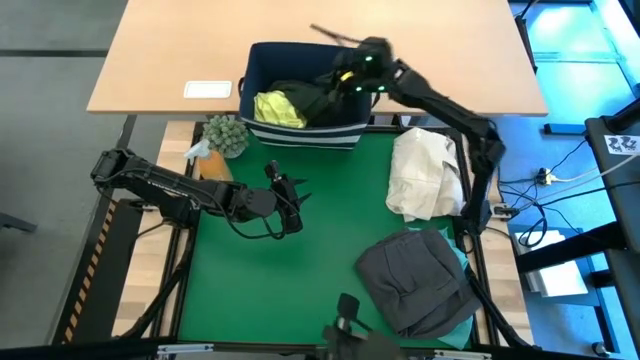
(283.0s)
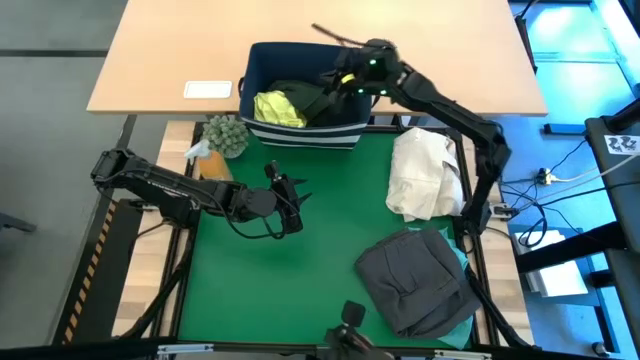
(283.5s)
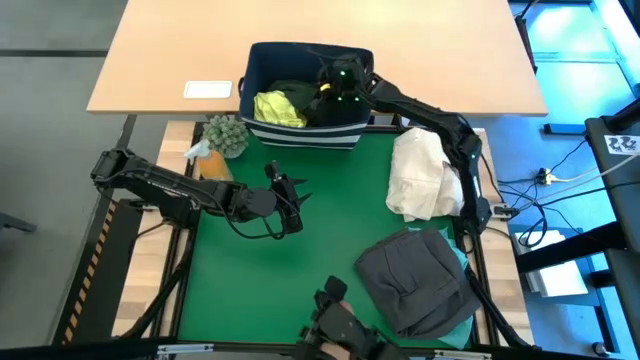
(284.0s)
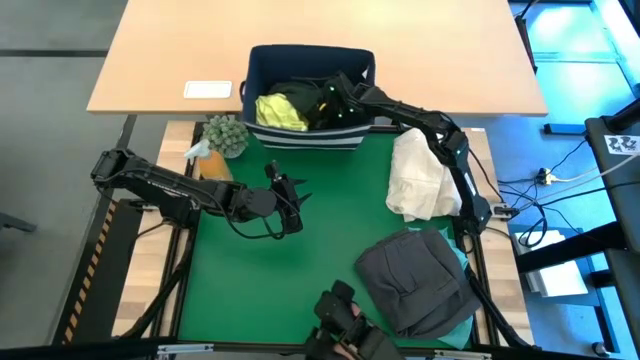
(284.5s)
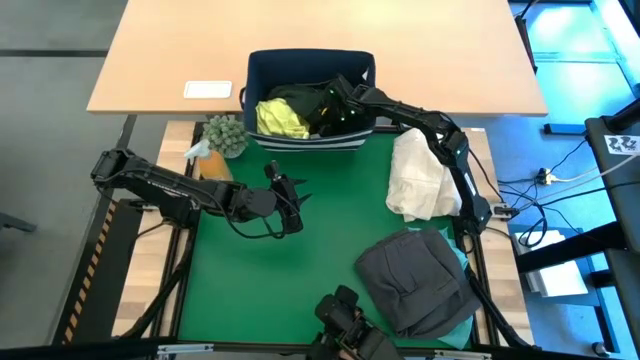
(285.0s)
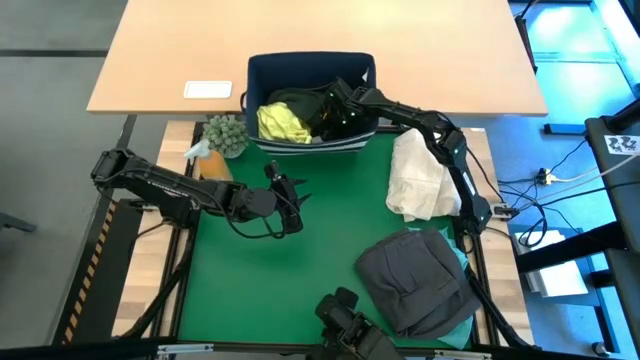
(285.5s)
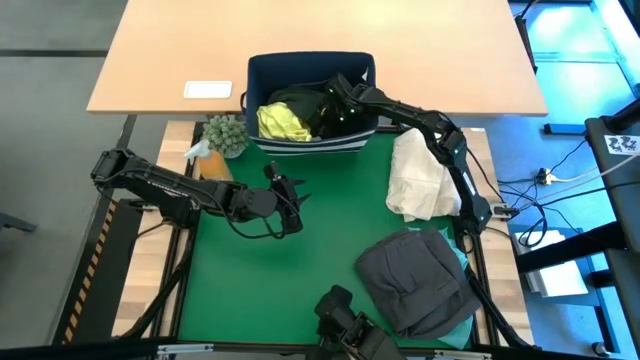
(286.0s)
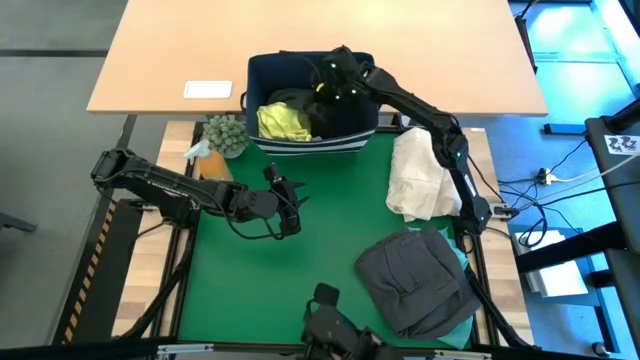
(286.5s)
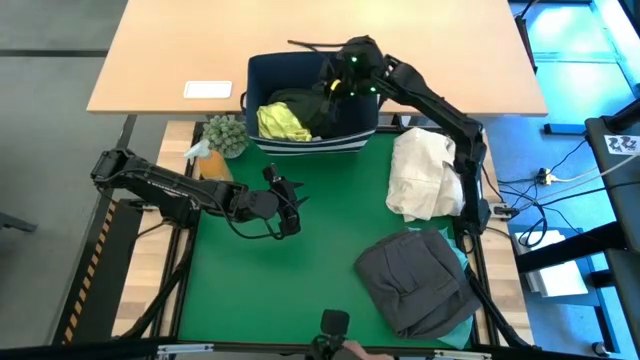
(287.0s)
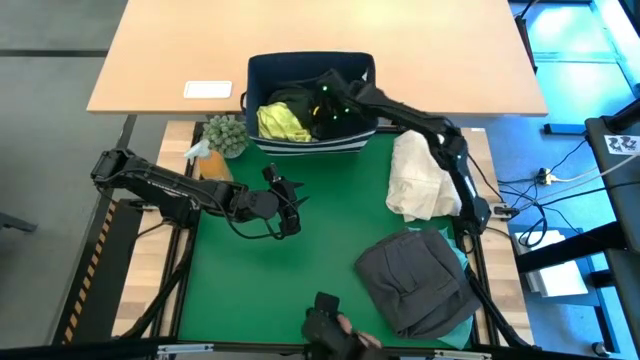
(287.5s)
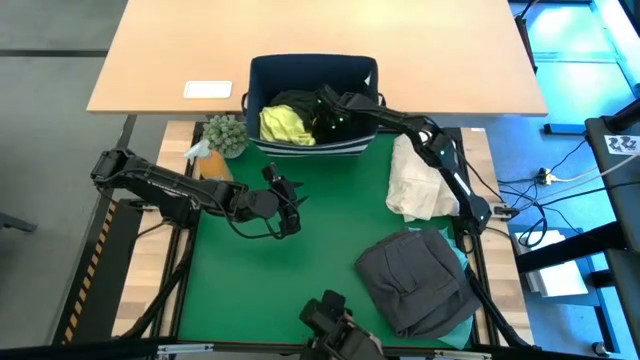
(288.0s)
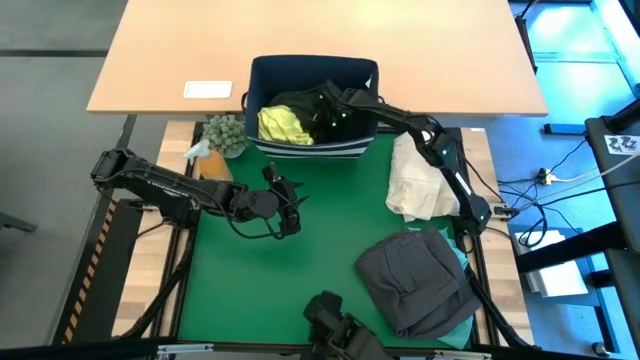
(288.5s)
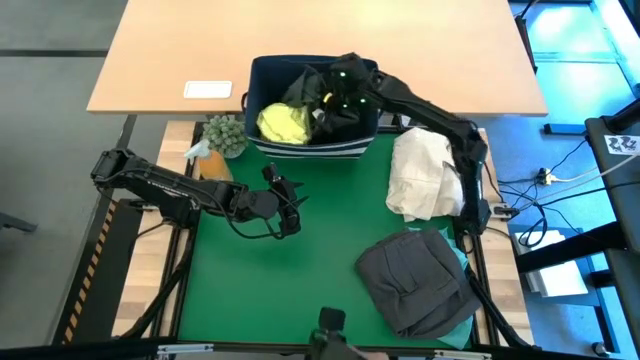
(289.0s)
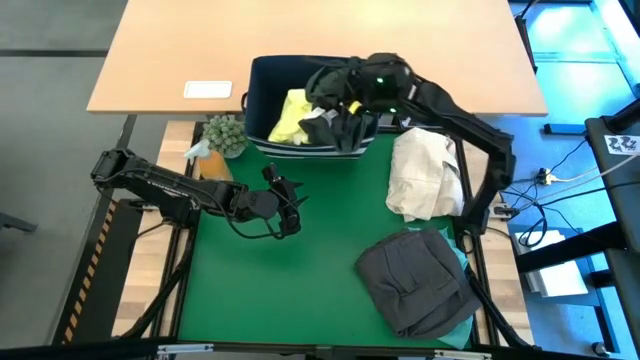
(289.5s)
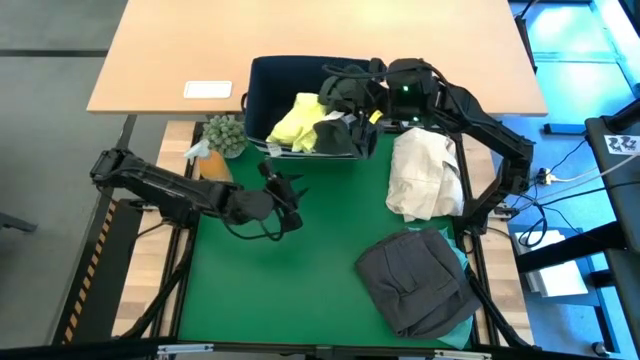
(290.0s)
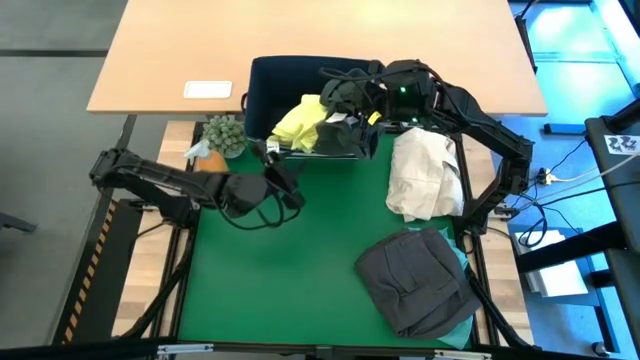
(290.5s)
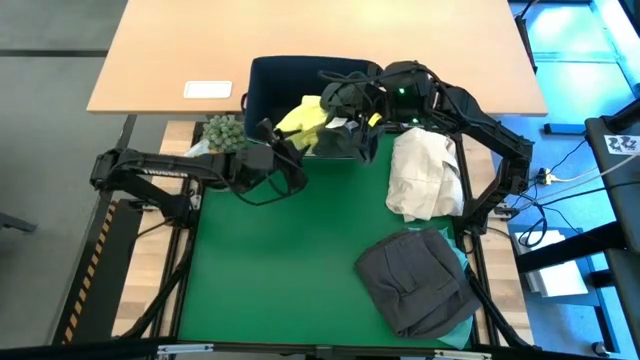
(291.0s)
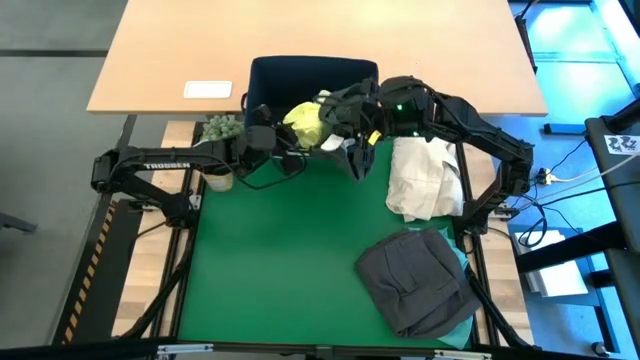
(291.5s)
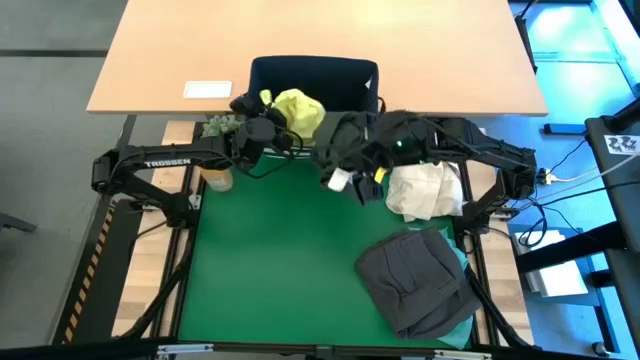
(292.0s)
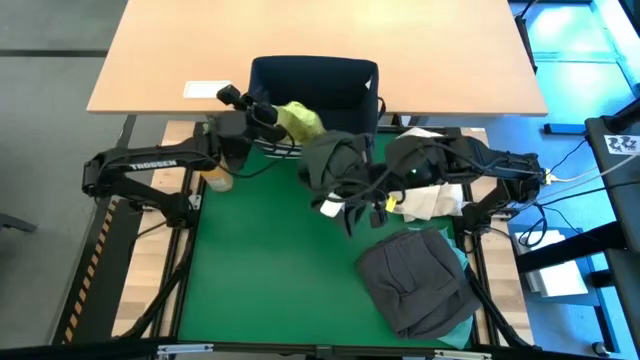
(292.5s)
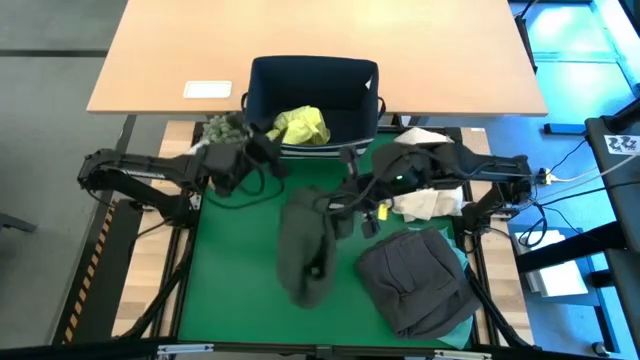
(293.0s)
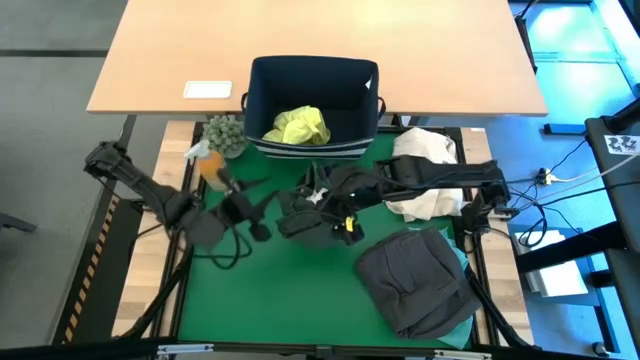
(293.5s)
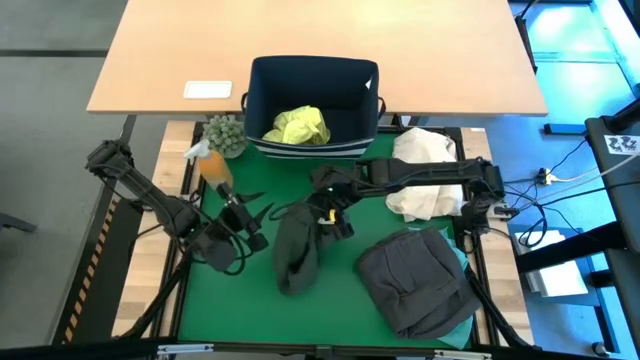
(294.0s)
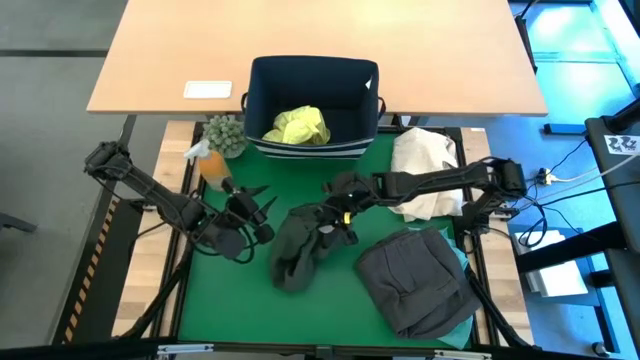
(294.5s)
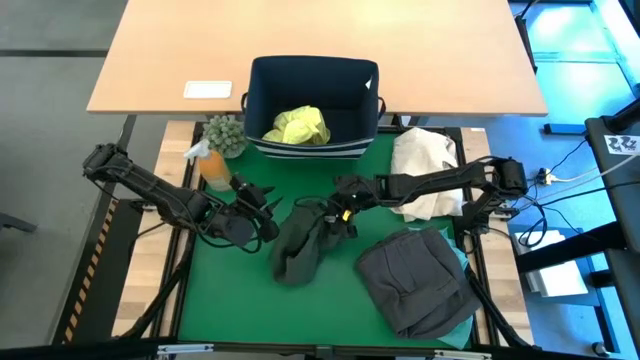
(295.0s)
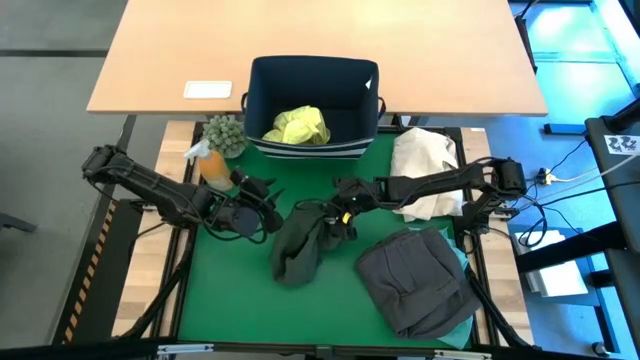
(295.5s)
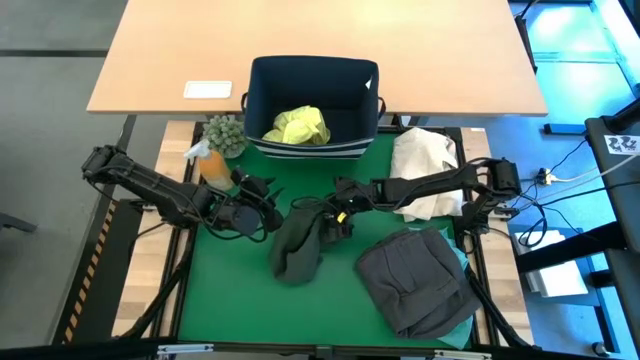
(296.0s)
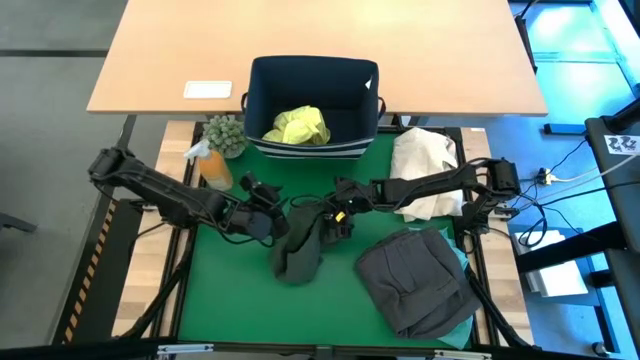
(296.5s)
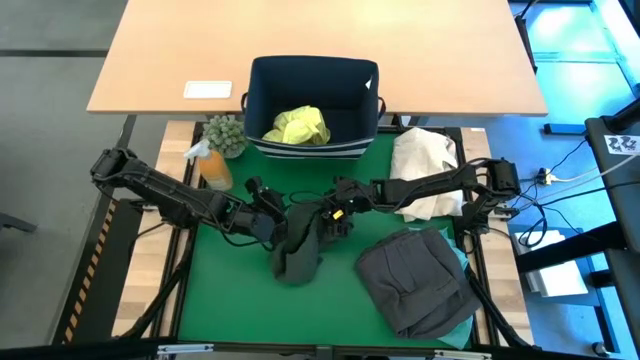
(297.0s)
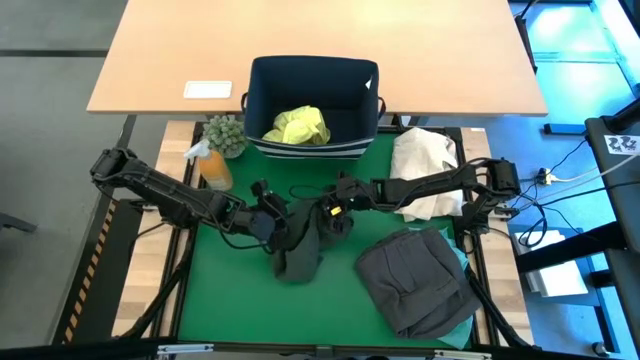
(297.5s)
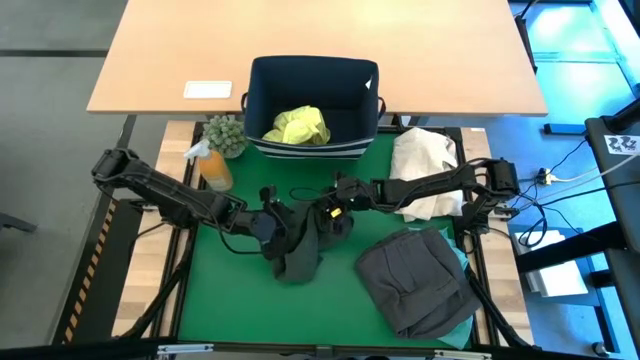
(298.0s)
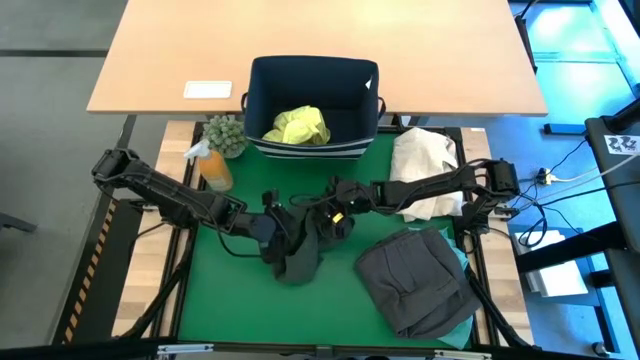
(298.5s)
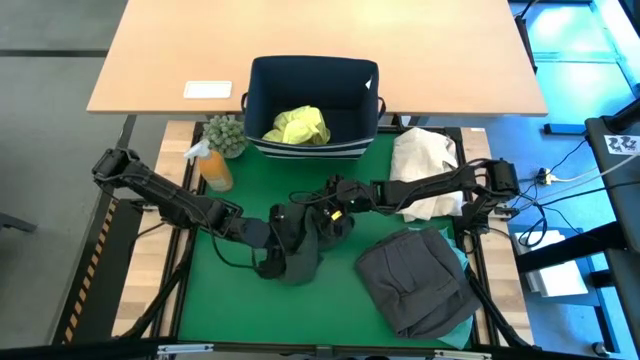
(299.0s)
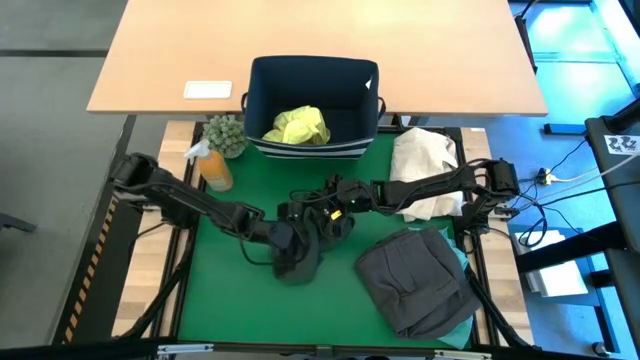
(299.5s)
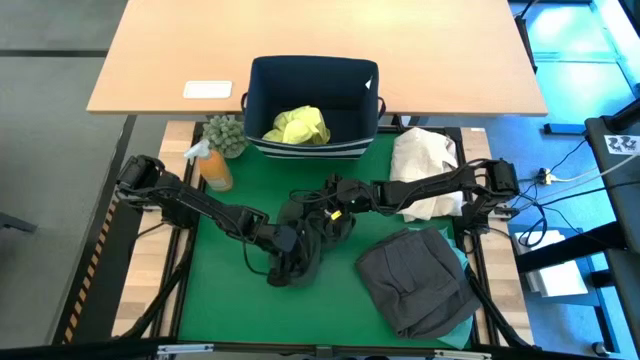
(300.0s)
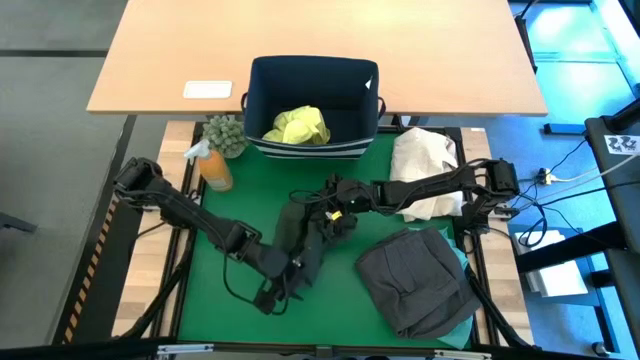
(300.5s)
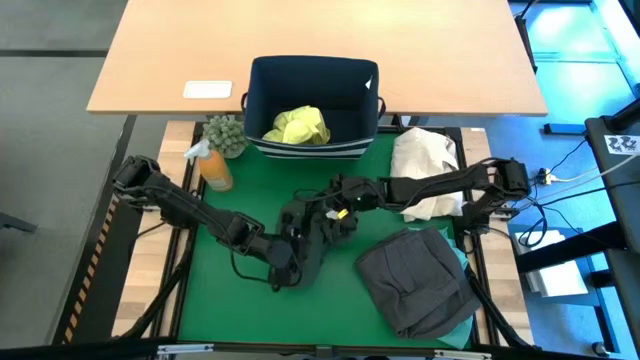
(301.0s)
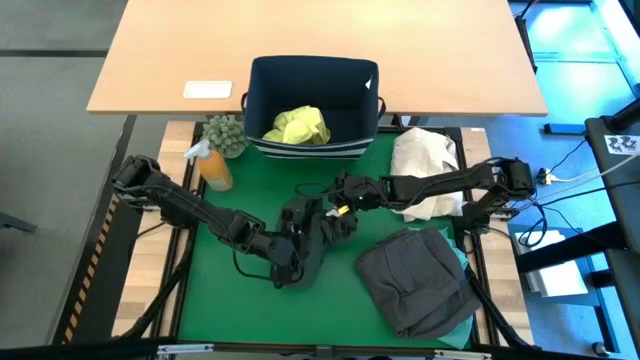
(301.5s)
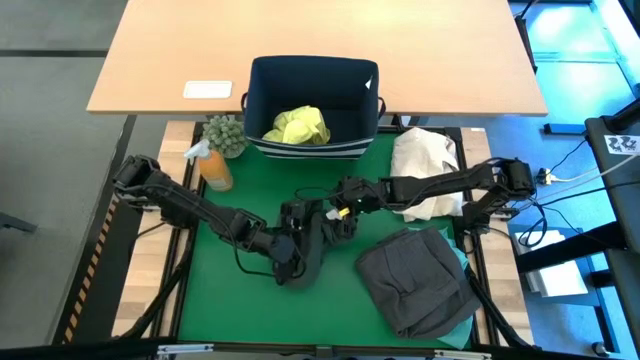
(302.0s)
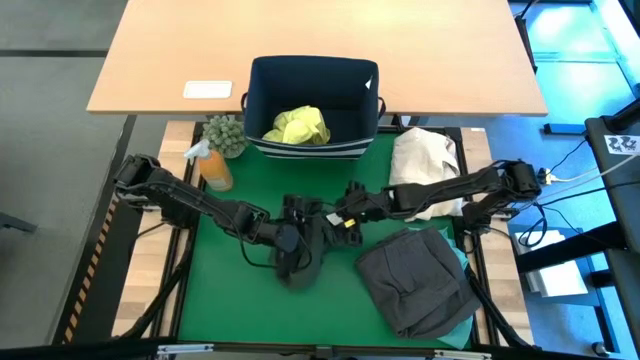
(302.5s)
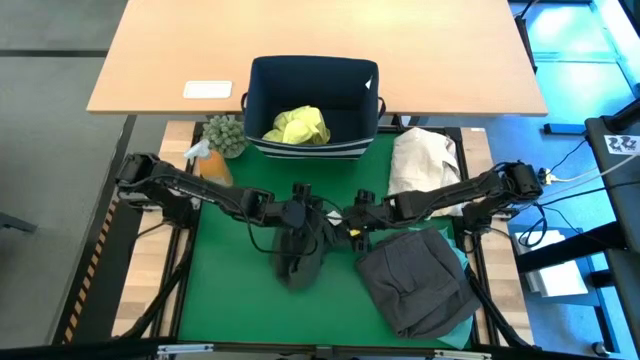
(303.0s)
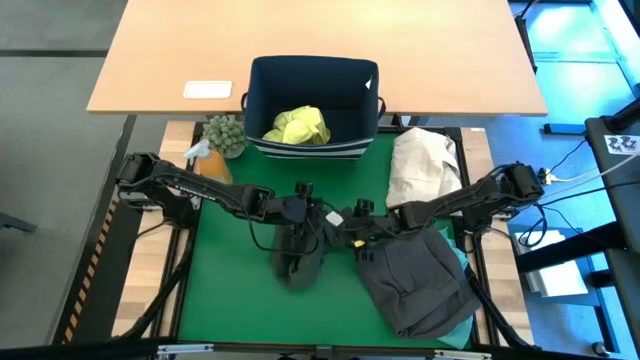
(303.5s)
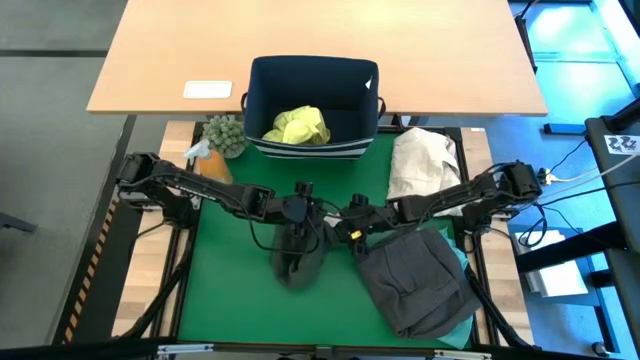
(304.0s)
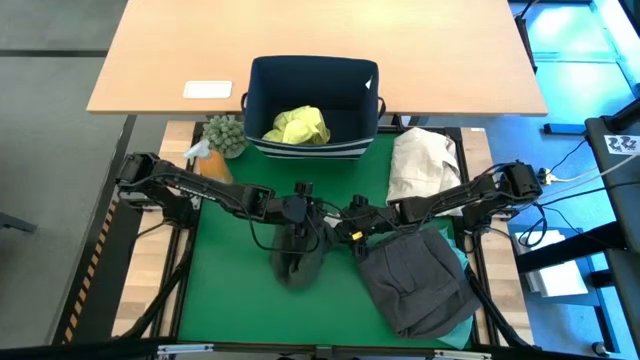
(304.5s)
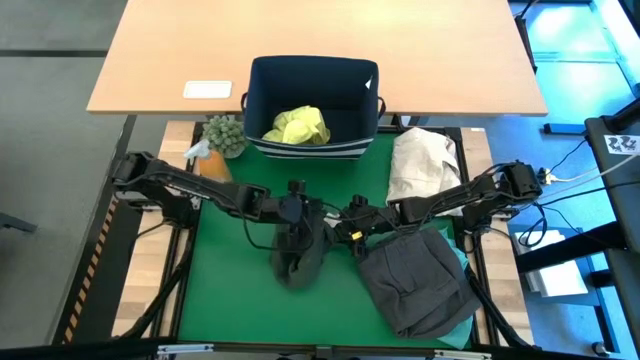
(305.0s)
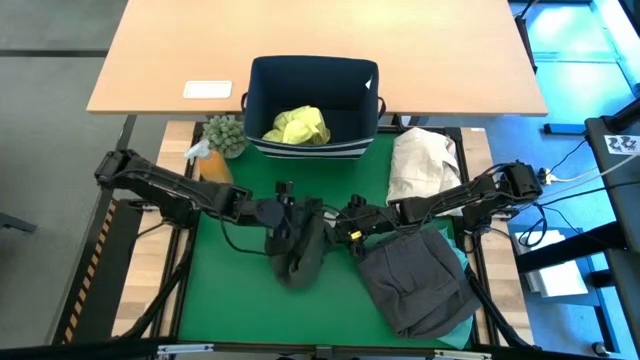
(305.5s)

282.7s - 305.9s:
Task: Fold laundry
Fold the green polo shirt
